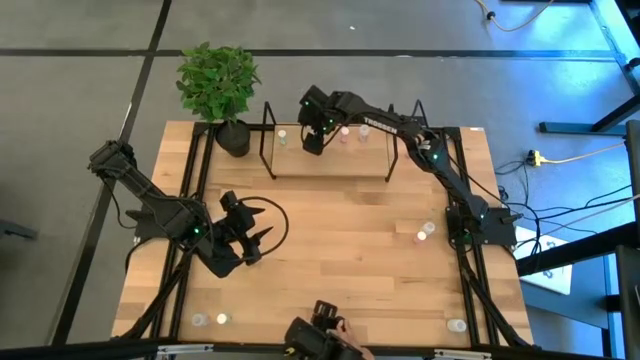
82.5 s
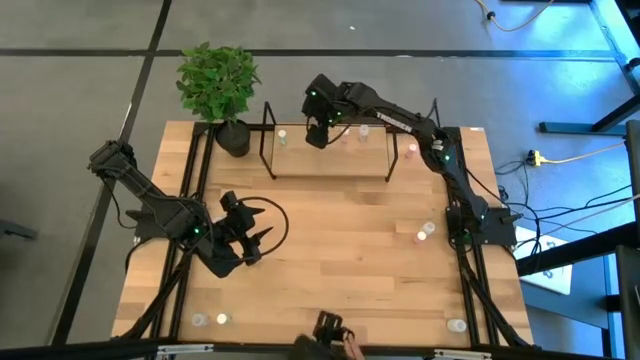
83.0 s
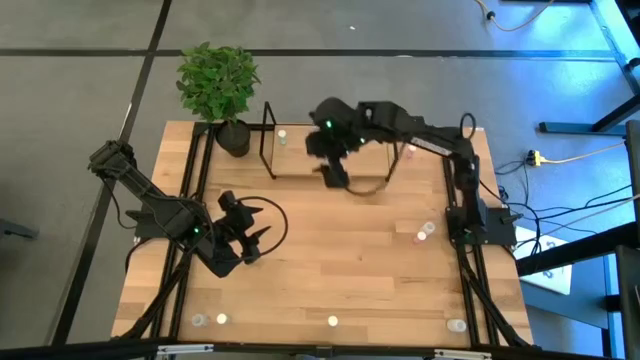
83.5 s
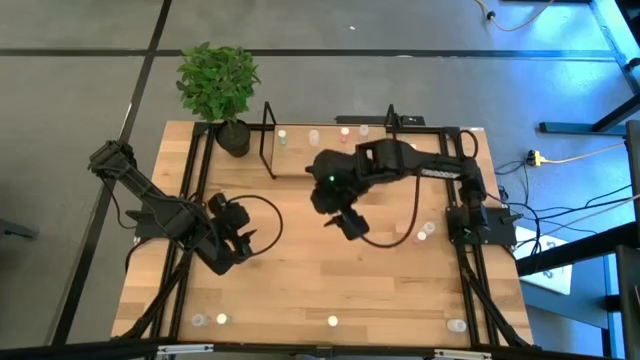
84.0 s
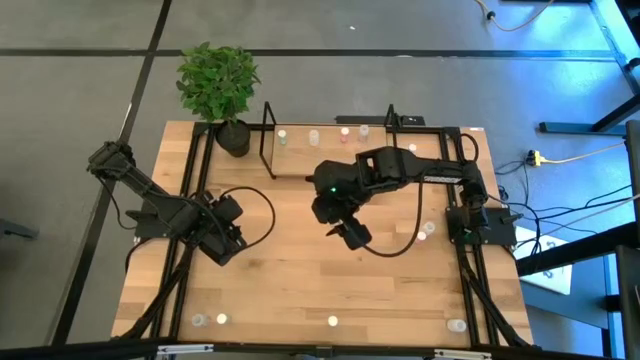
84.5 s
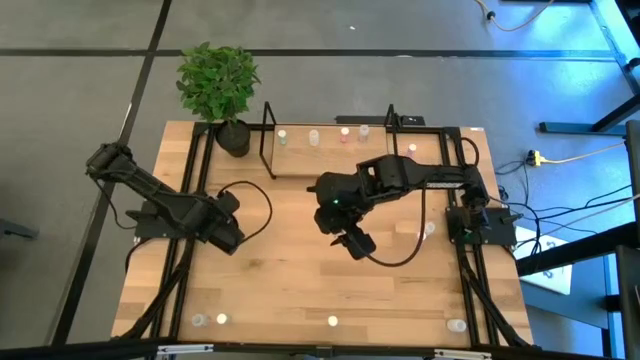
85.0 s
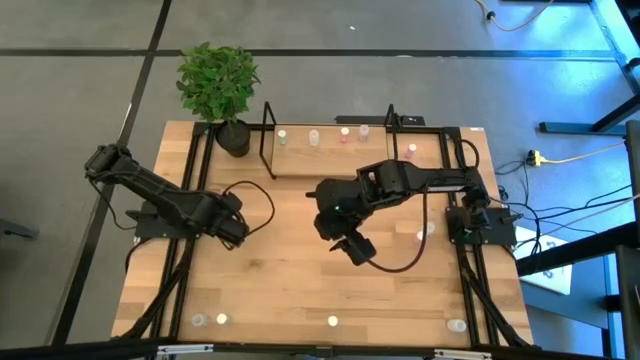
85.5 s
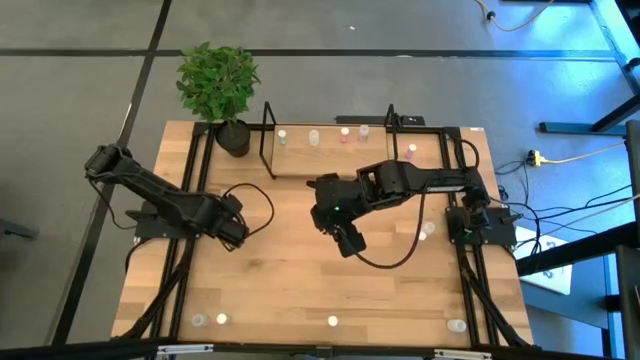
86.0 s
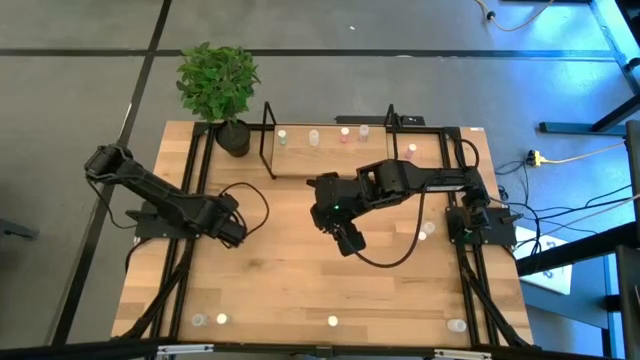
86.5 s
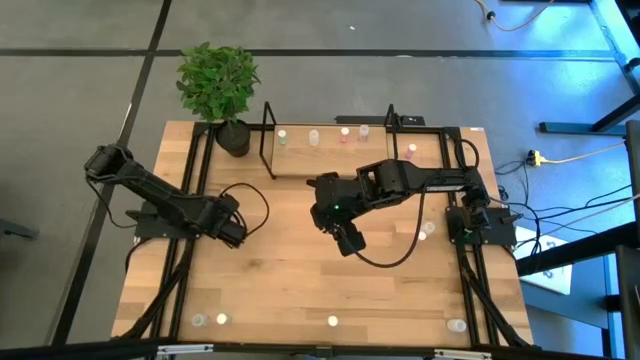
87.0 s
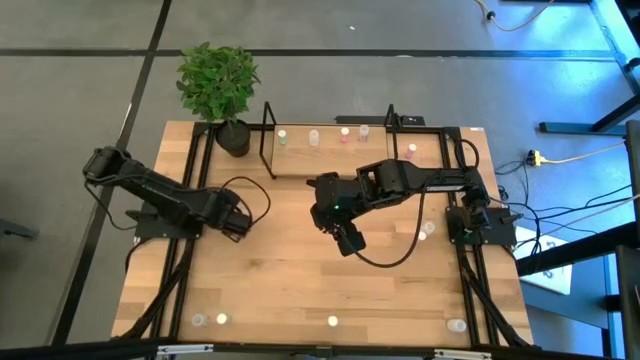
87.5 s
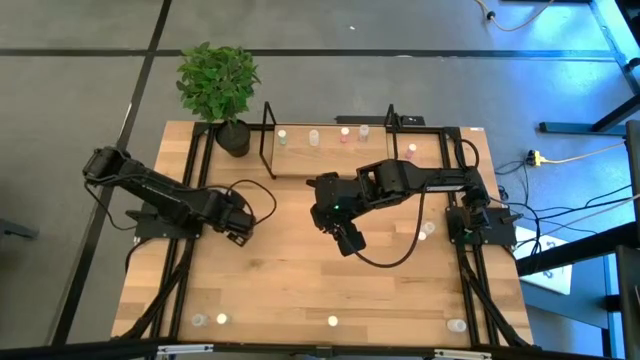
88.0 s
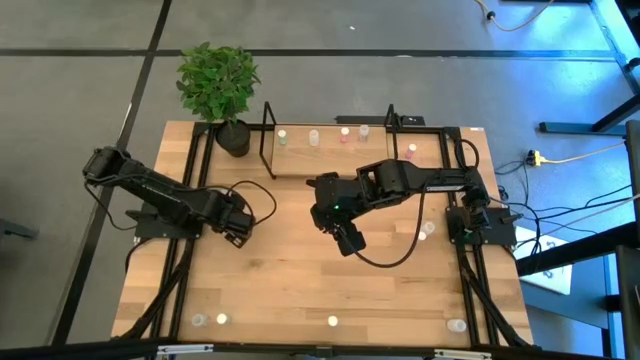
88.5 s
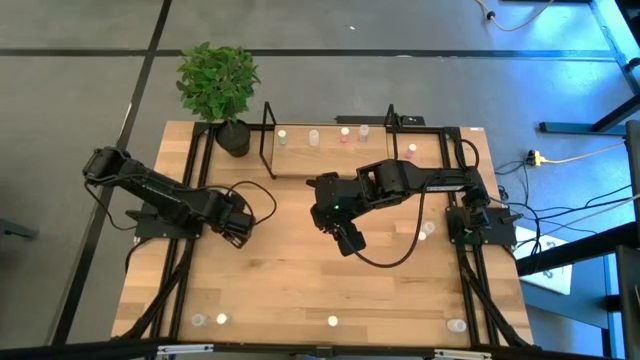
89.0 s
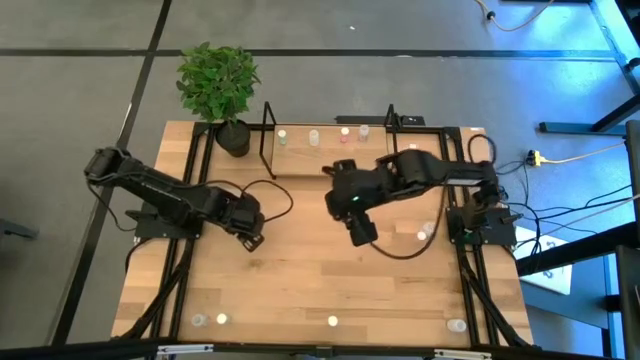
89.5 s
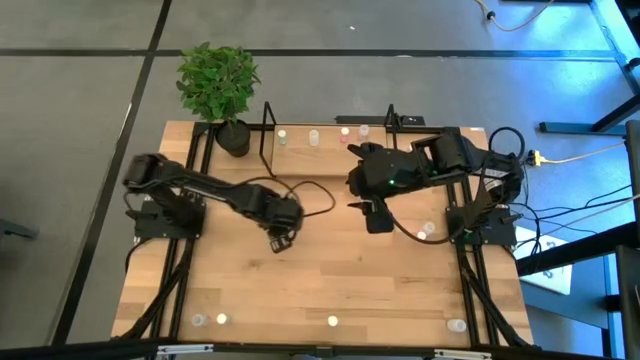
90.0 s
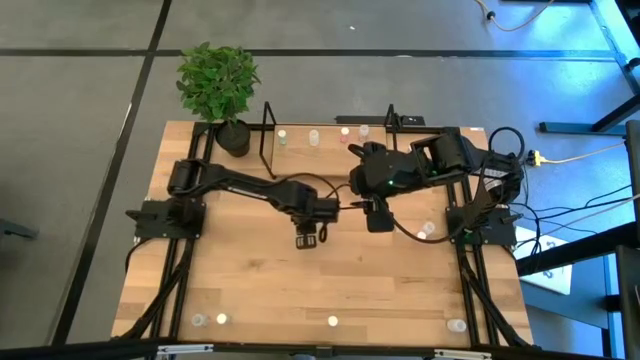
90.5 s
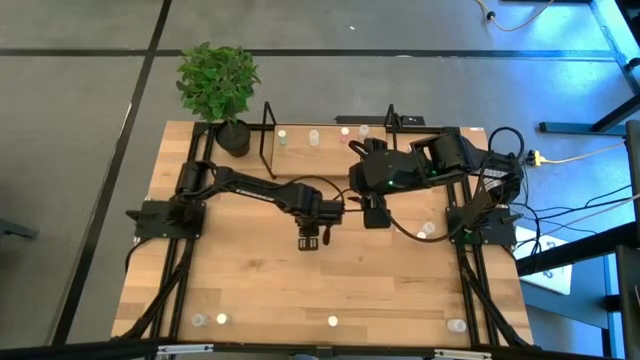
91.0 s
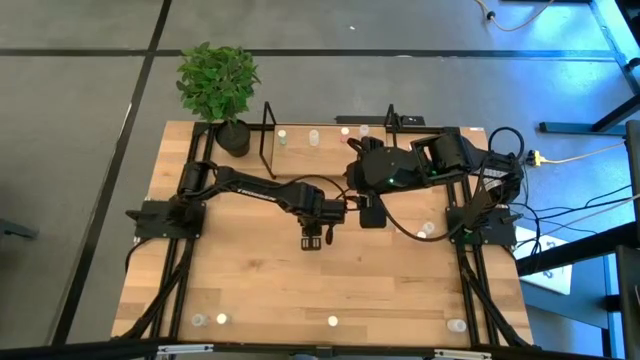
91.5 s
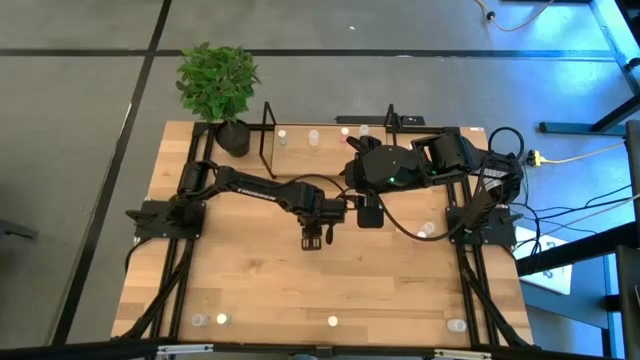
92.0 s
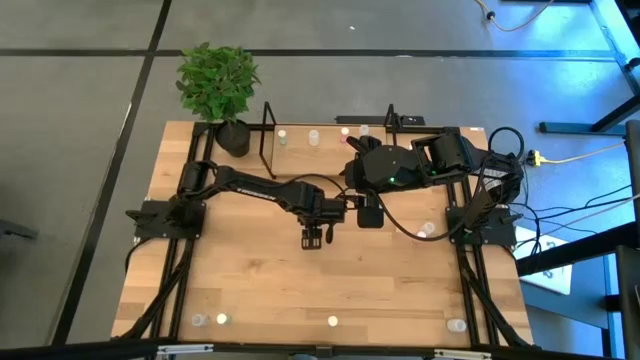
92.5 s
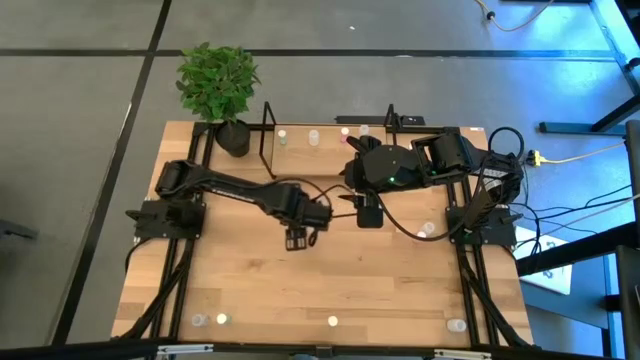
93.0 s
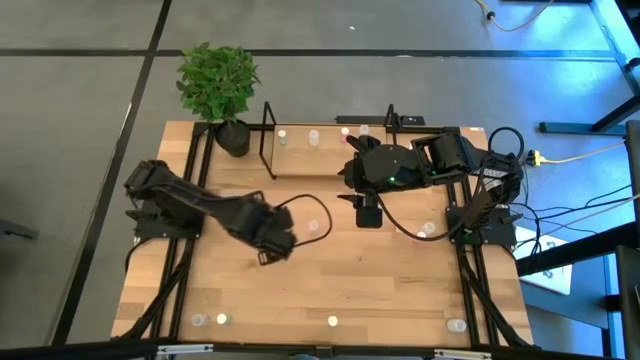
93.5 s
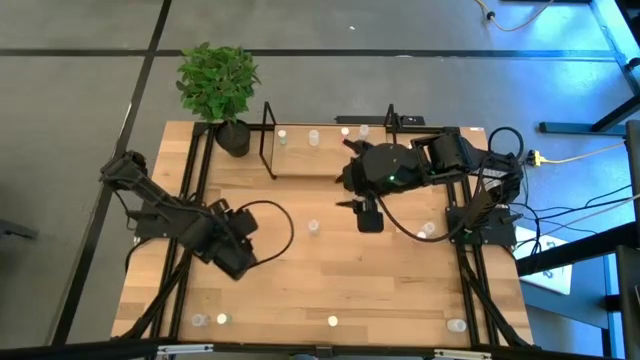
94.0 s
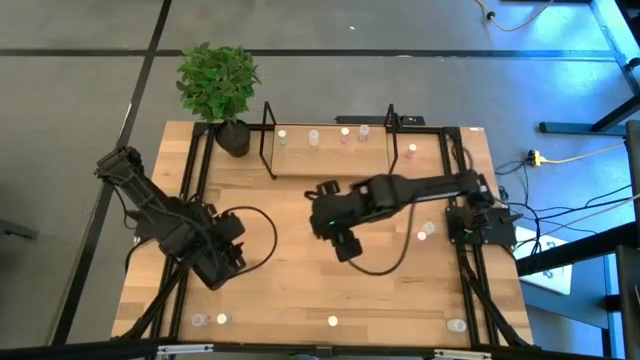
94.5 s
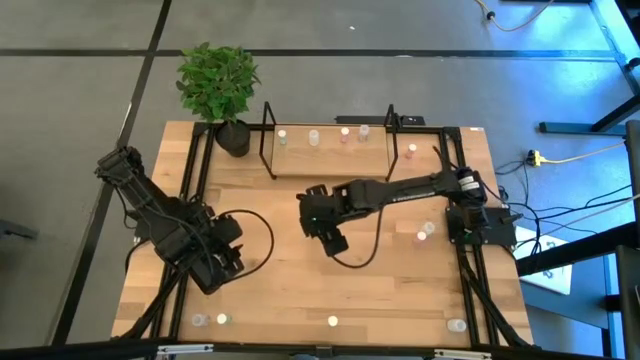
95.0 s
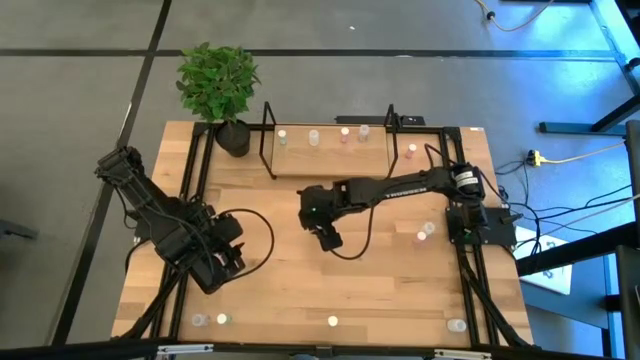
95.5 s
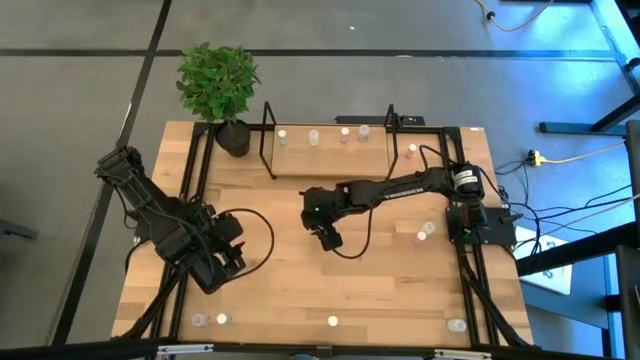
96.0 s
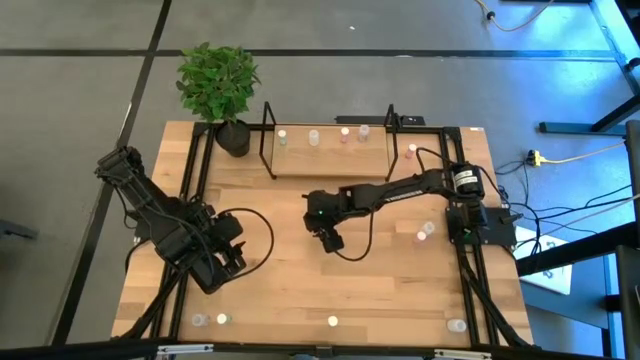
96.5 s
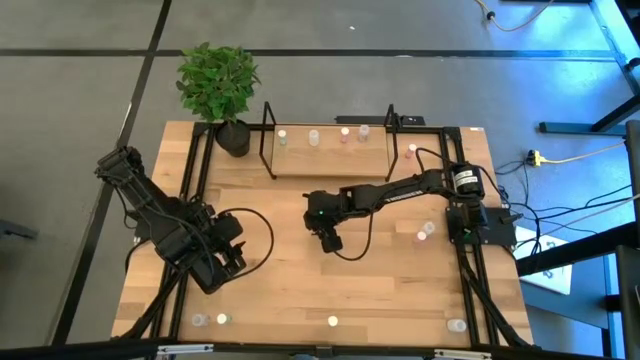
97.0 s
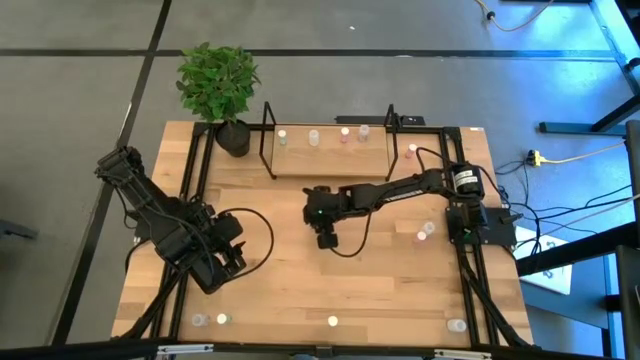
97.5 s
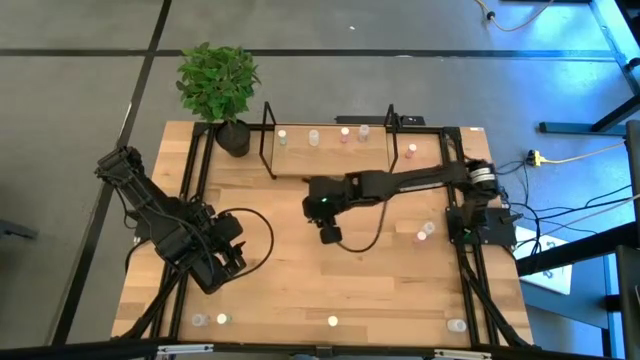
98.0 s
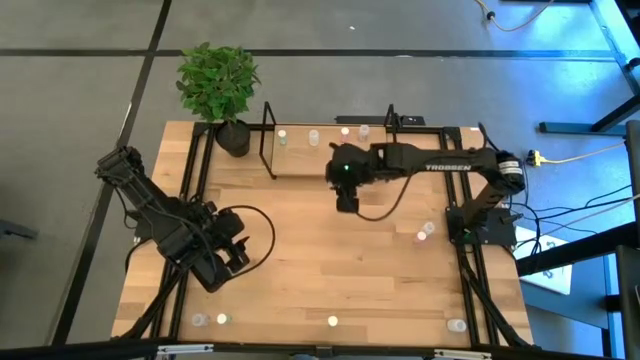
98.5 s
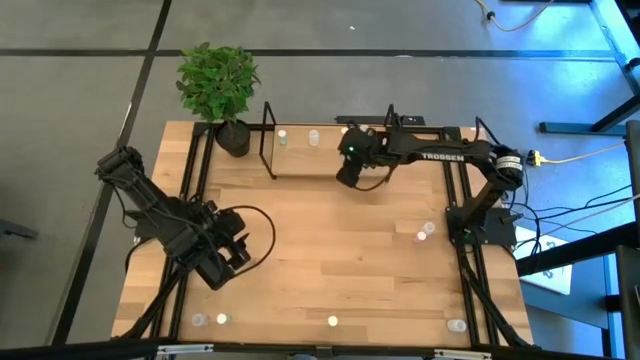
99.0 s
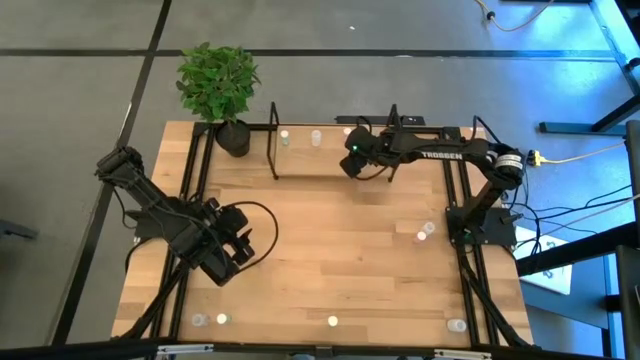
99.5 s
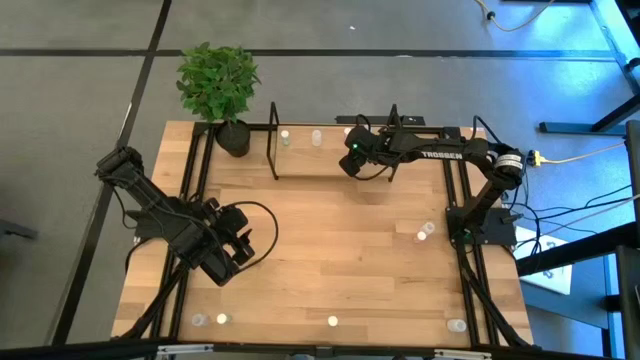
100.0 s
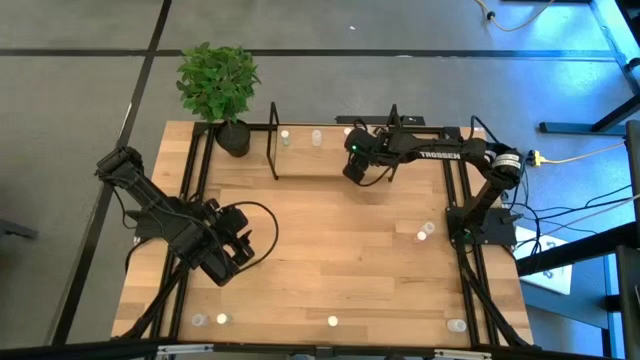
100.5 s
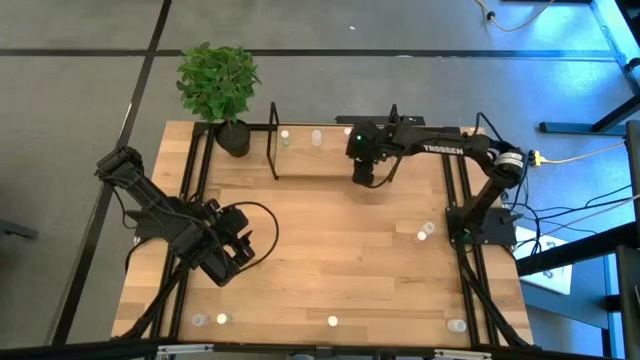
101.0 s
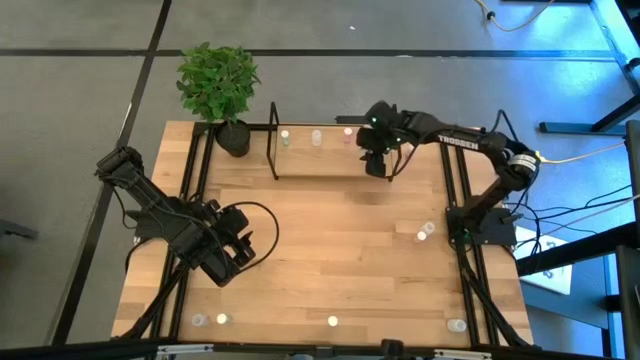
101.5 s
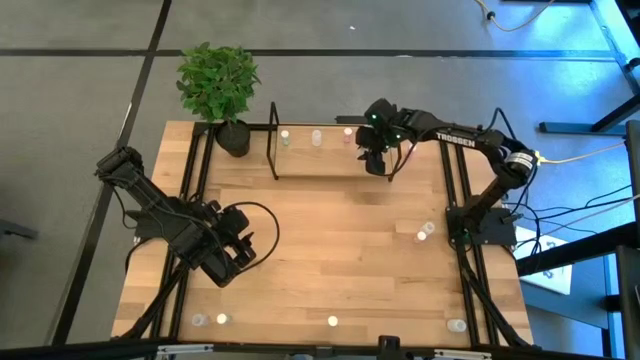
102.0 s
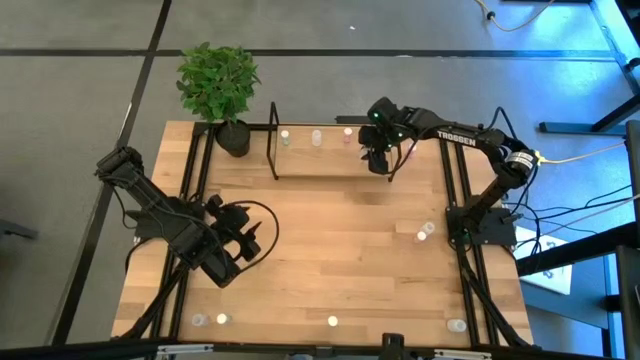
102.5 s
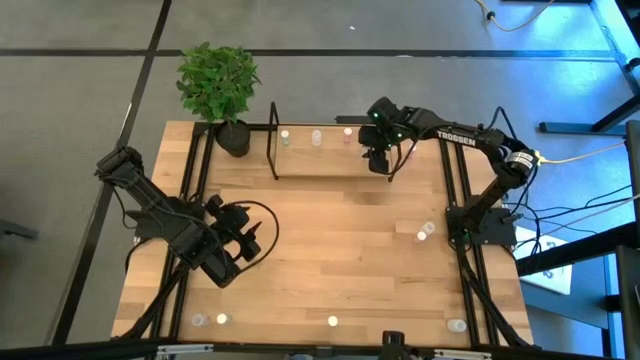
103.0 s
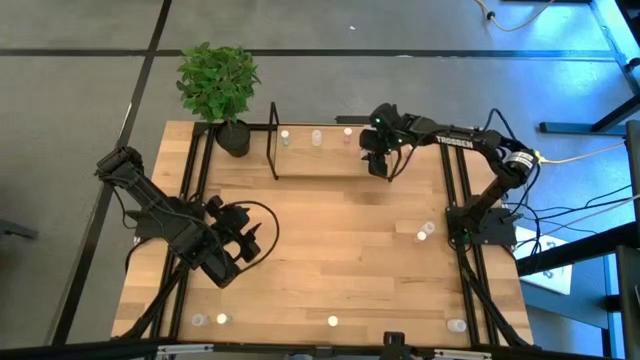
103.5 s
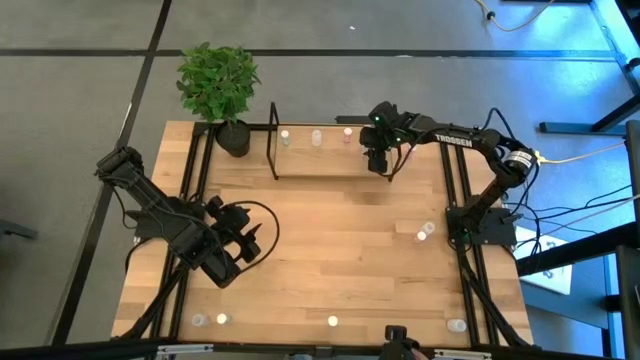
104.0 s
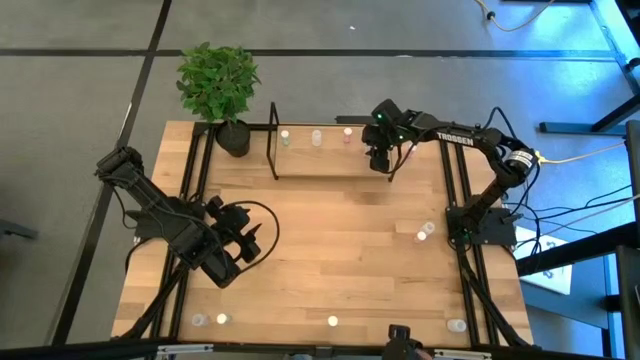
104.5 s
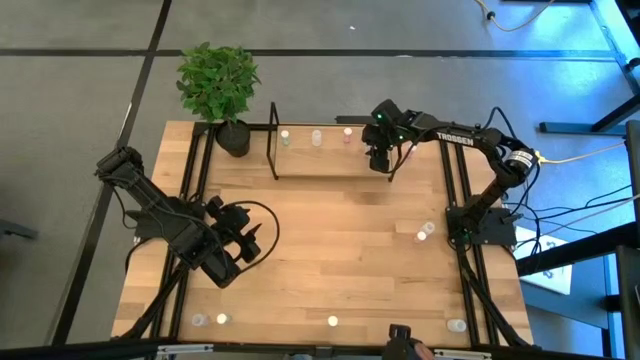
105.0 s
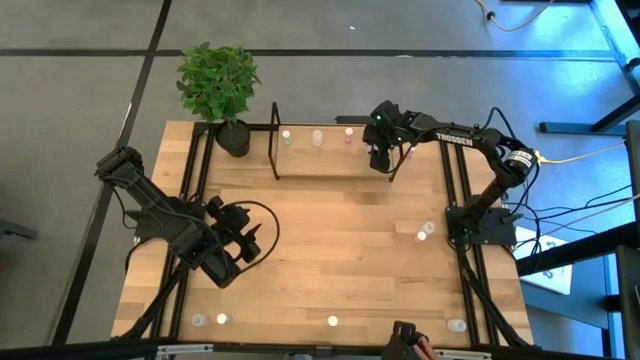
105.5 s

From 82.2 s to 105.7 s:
Task: Pick and place medicine bottles onto shelf by color
Put the top transparent medicine bottle on the shelf aligned with the other transparent medicine bottle
